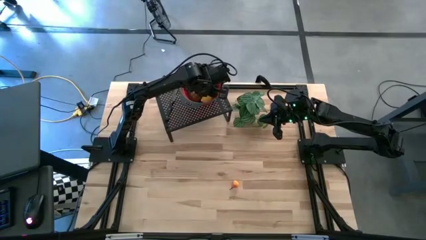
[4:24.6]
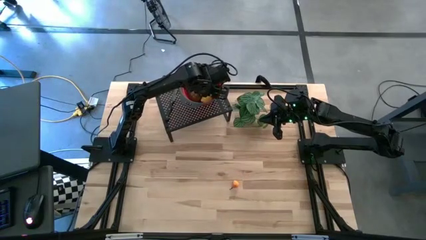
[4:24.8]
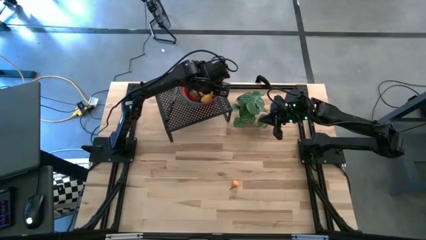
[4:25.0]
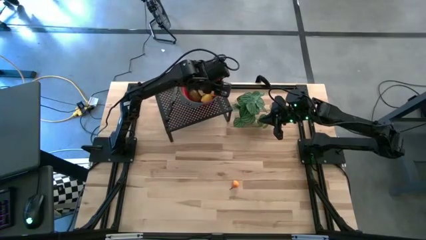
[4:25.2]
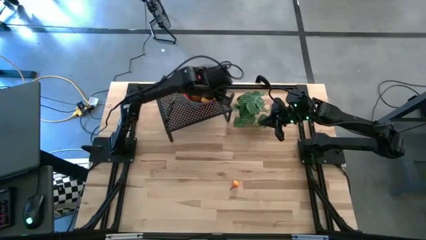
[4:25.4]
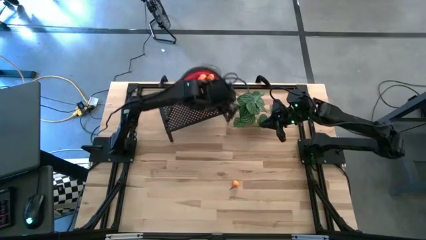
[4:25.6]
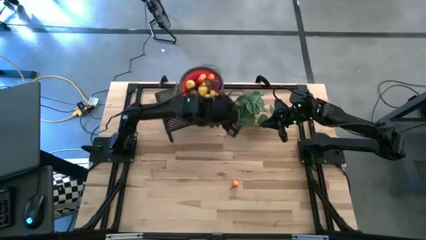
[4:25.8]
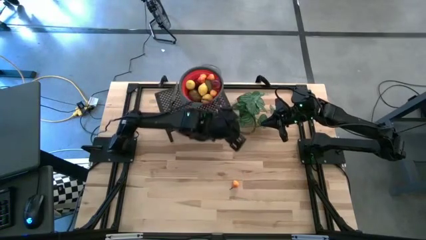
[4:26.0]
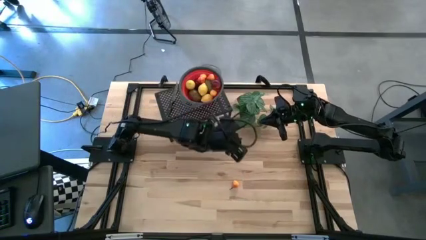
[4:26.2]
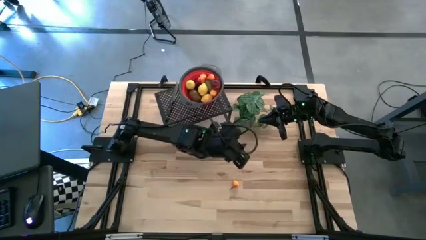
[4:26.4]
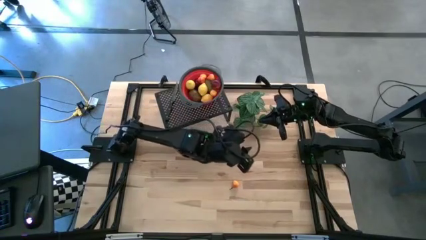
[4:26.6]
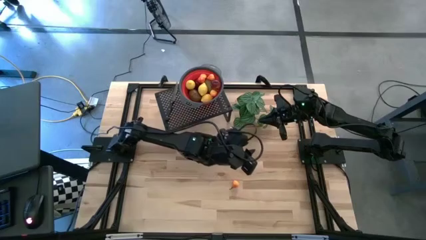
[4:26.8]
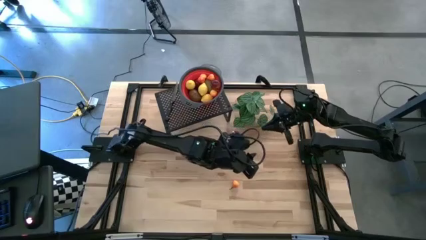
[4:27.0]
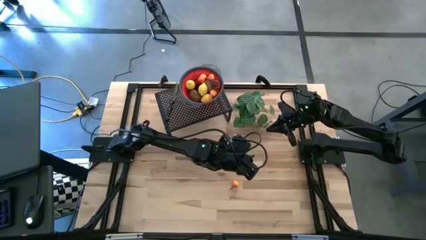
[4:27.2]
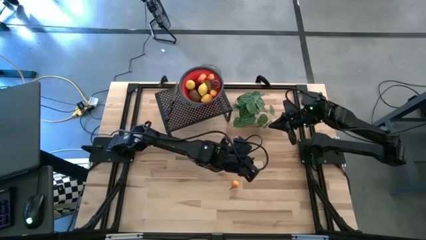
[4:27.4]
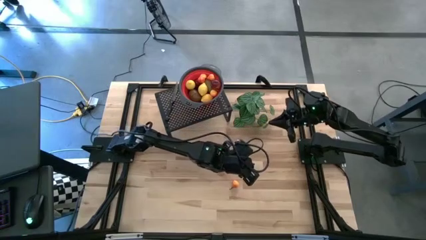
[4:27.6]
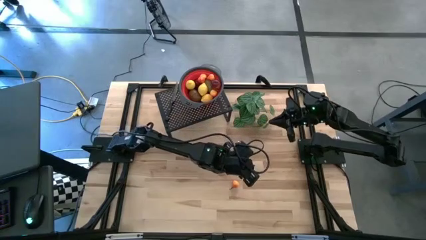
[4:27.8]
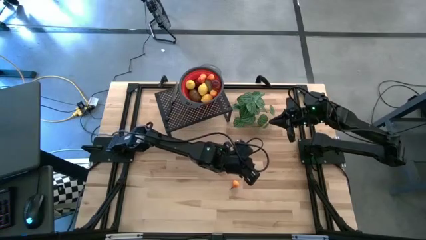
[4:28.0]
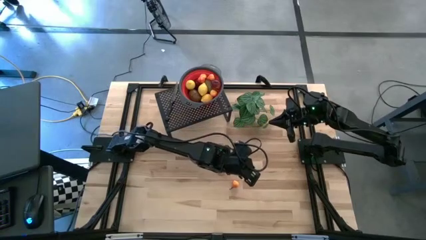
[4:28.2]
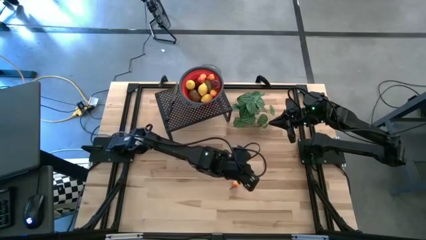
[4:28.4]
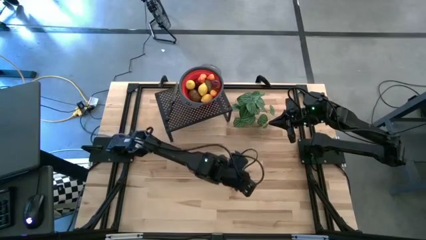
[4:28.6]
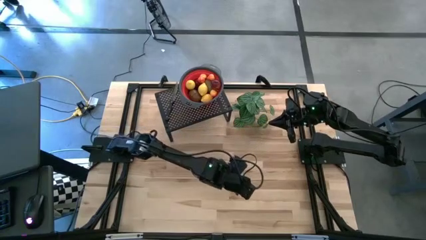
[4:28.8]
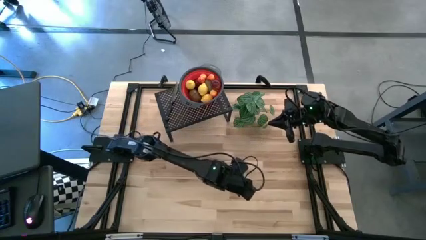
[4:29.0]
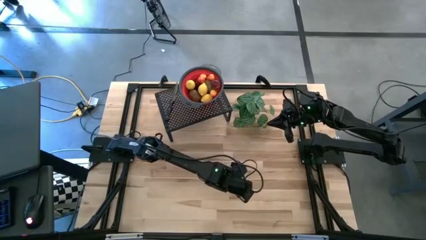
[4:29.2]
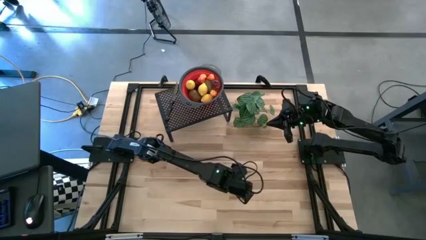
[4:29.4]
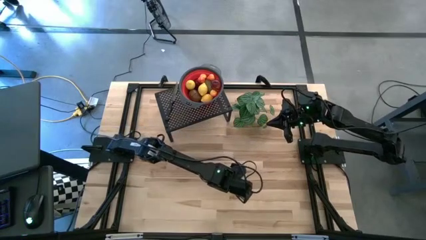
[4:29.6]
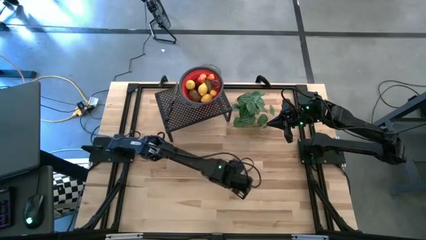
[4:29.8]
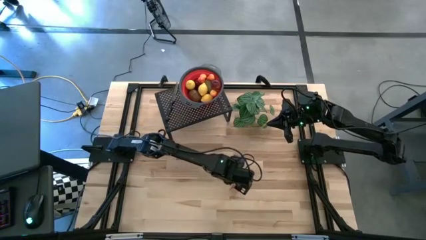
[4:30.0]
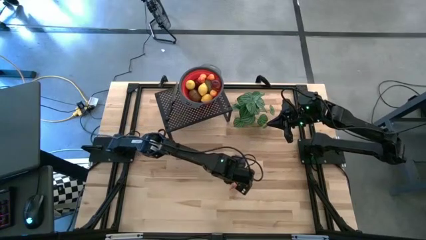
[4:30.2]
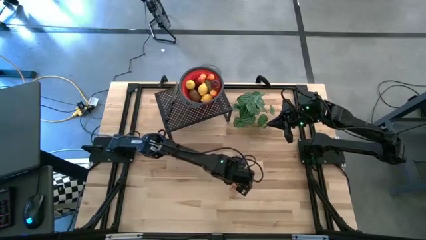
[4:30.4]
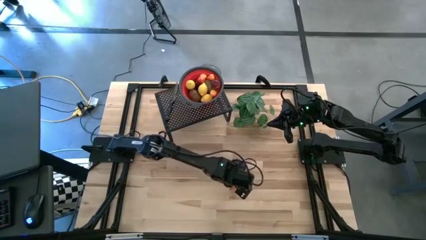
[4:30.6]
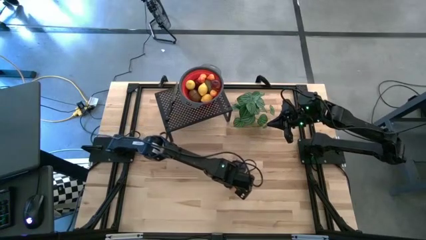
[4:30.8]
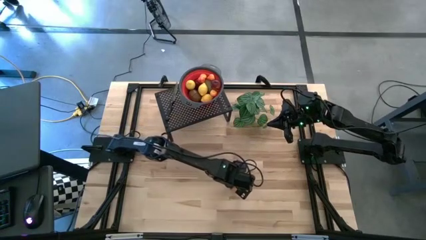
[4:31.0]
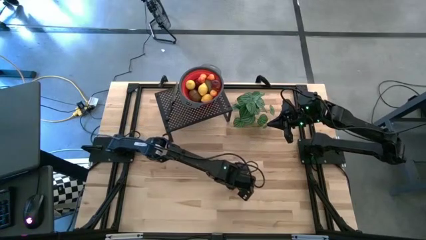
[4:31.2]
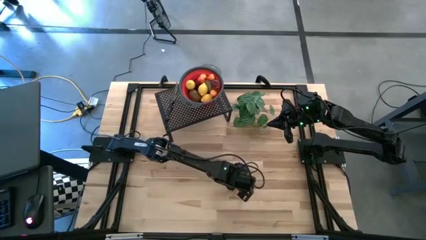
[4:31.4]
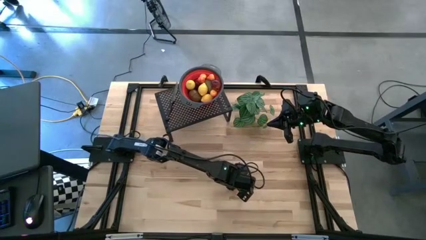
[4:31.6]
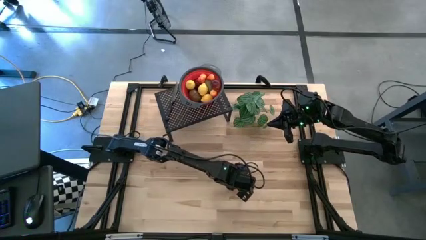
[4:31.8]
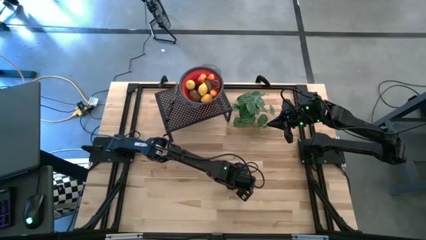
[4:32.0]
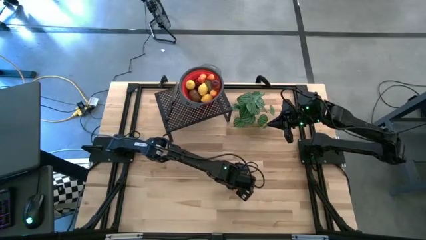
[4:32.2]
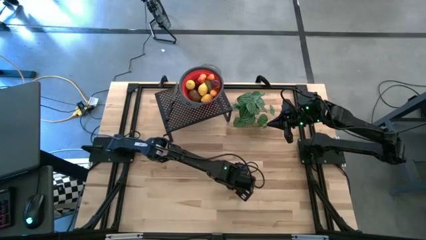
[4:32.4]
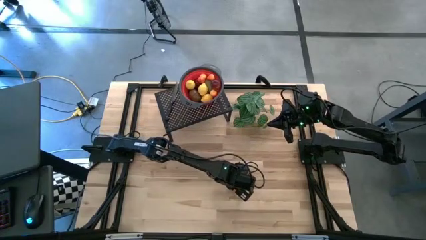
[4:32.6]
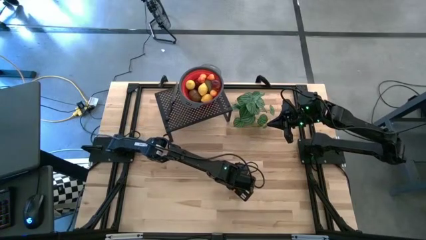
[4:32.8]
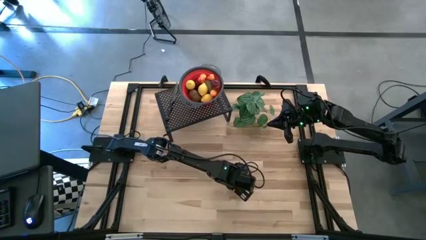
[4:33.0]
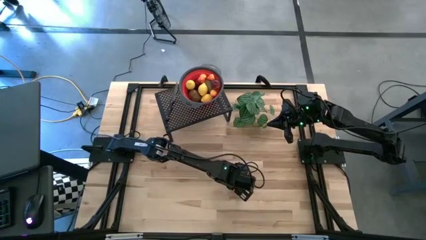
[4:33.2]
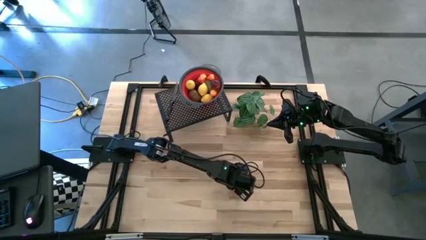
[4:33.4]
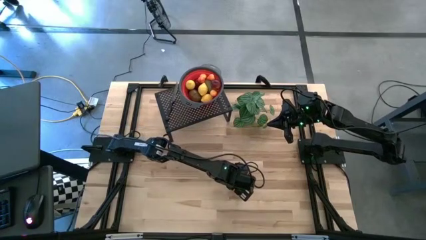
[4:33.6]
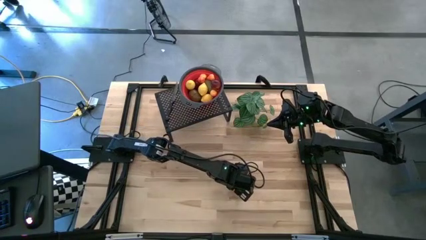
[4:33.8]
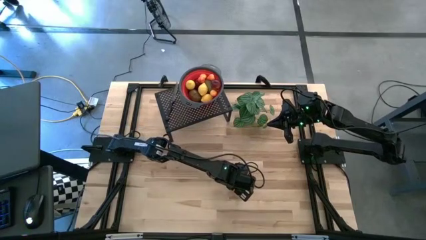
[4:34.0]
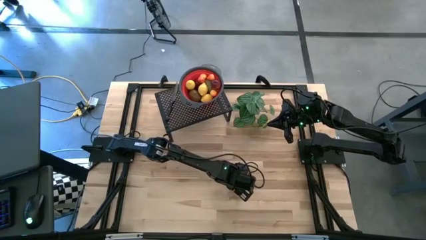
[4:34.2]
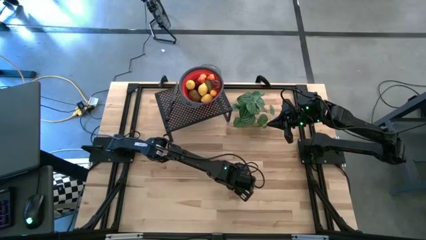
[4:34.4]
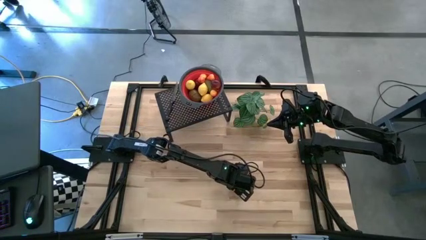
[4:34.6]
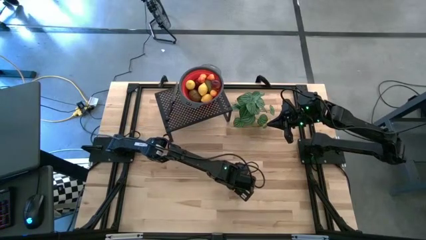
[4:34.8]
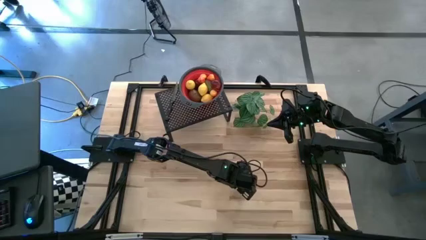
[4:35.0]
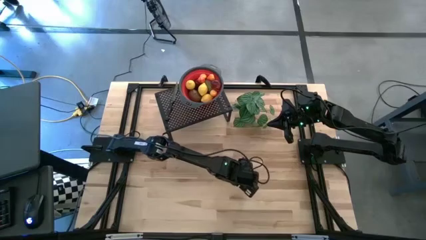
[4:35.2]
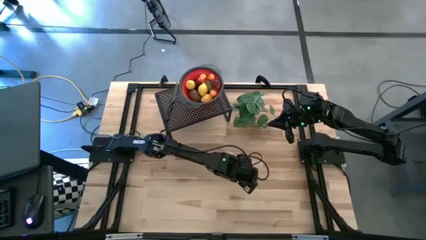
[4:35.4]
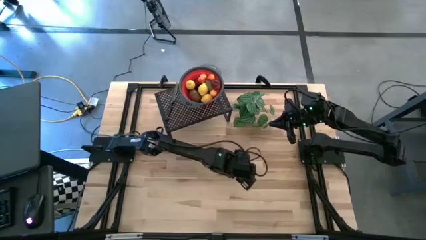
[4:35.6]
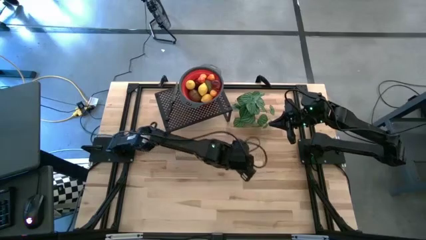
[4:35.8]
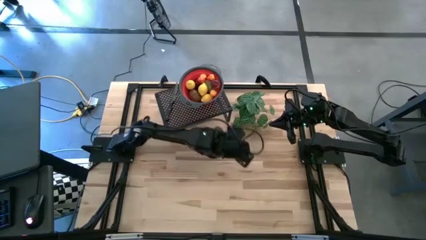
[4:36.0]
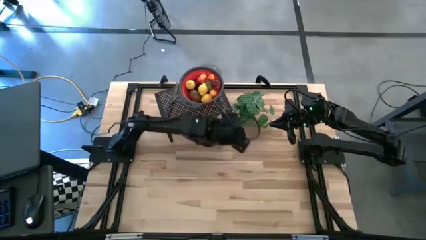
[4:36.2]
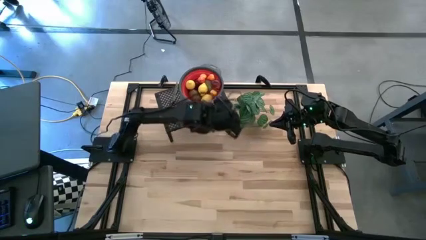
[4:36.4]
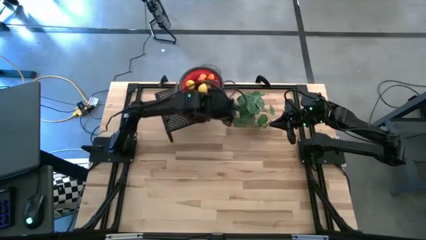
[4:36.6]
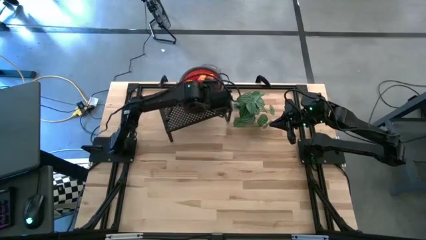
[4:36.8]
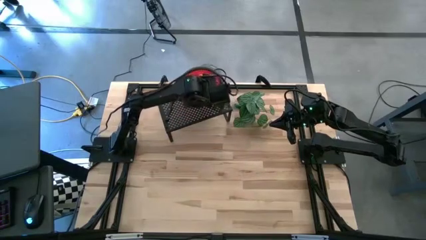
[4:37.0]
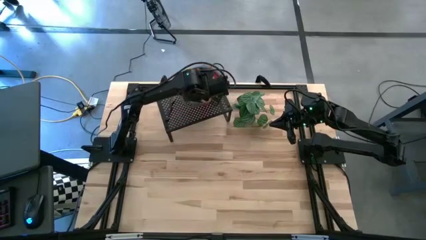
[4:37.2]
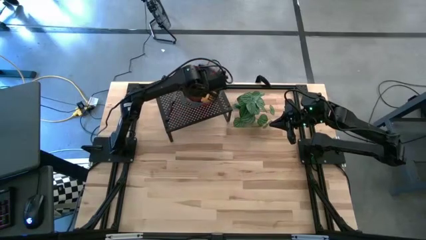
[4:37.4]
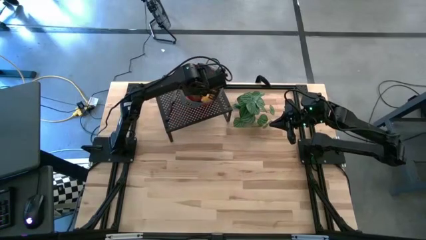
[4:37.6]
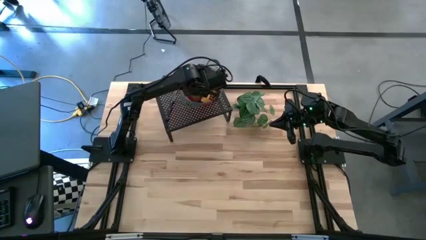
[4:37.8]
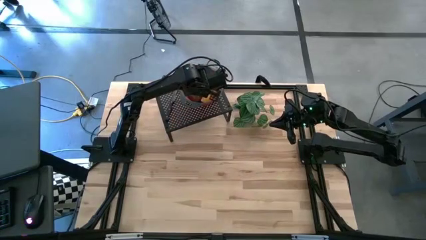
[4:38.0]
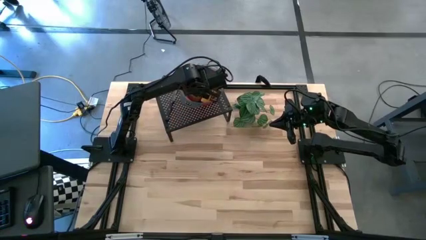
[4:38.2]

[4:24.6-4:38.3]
Task: Pick & Place Fruit
Put the orange pear into the red basket on the shelf
